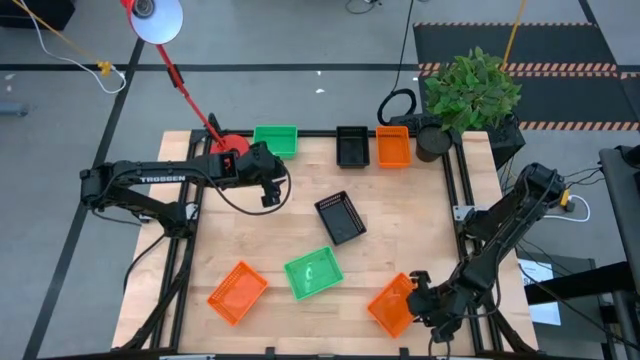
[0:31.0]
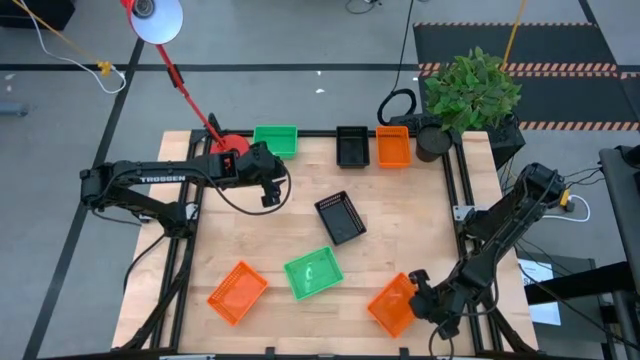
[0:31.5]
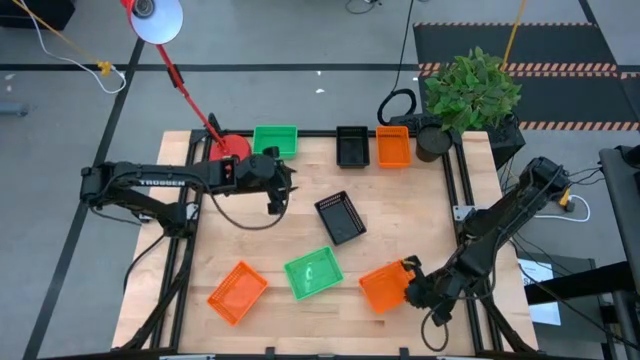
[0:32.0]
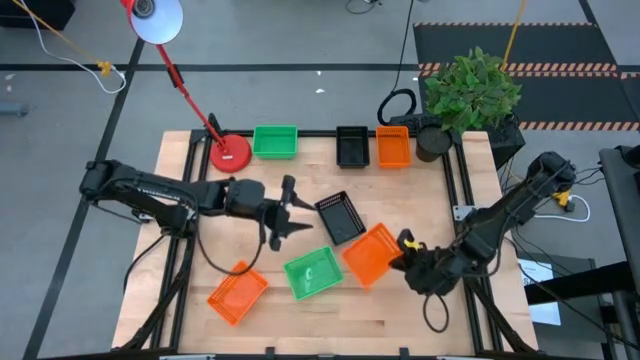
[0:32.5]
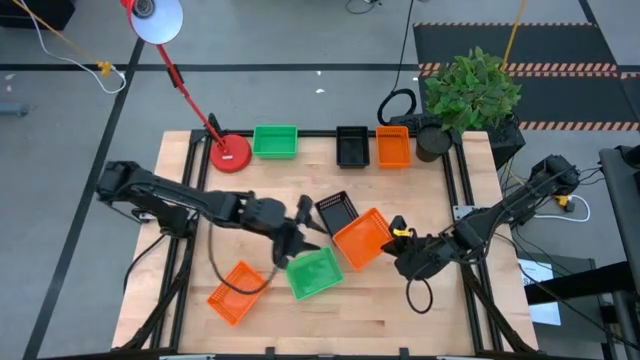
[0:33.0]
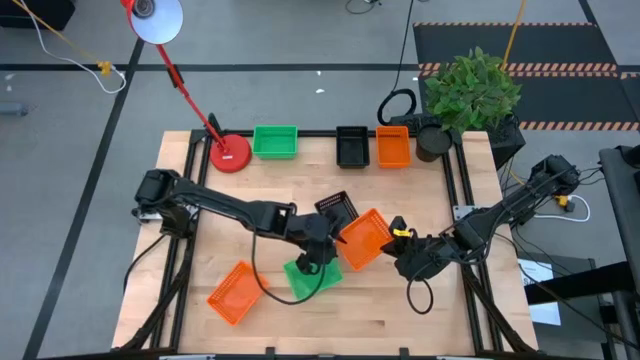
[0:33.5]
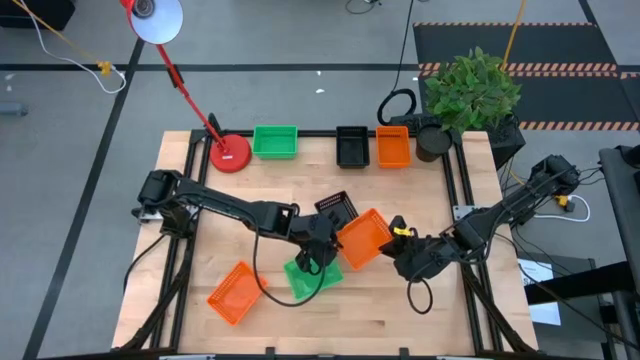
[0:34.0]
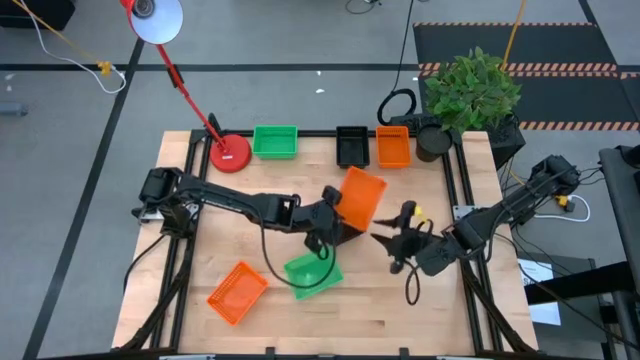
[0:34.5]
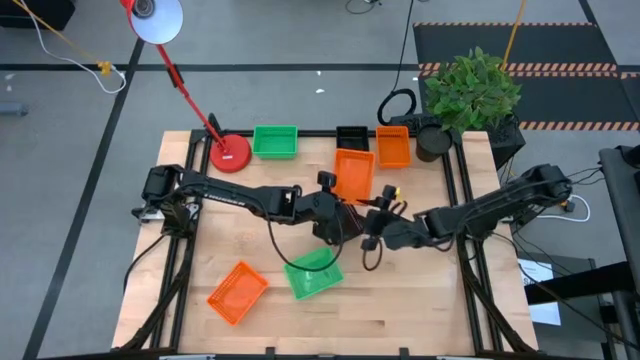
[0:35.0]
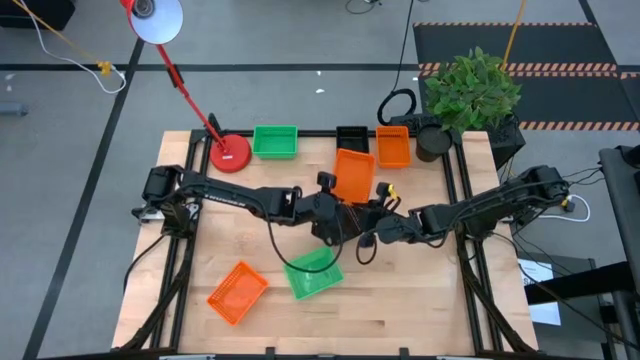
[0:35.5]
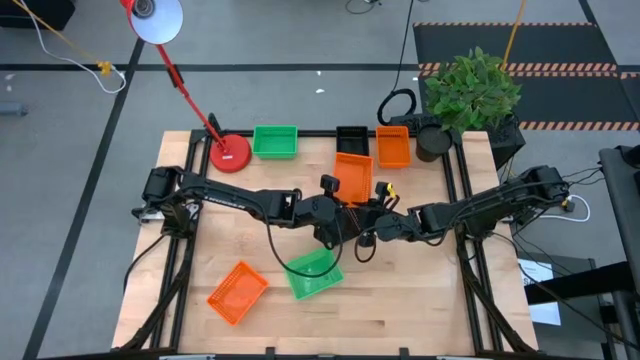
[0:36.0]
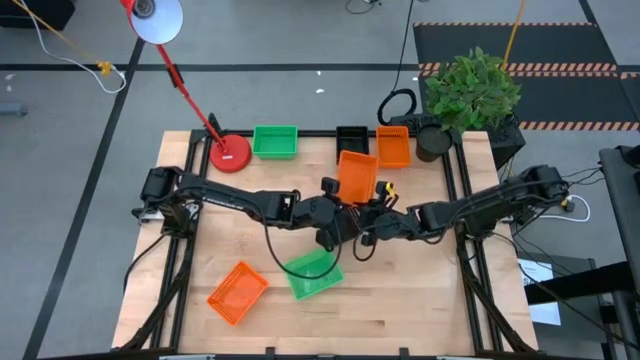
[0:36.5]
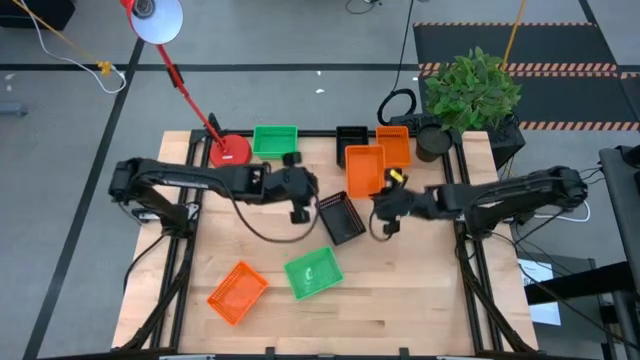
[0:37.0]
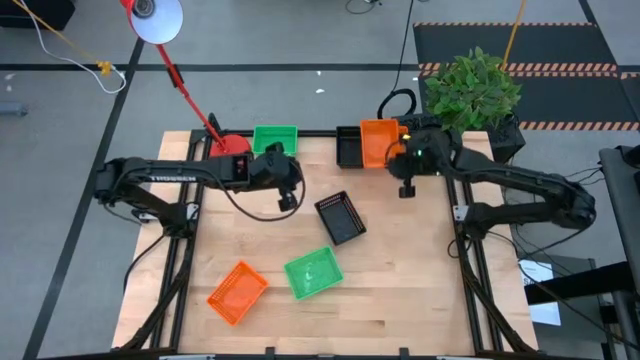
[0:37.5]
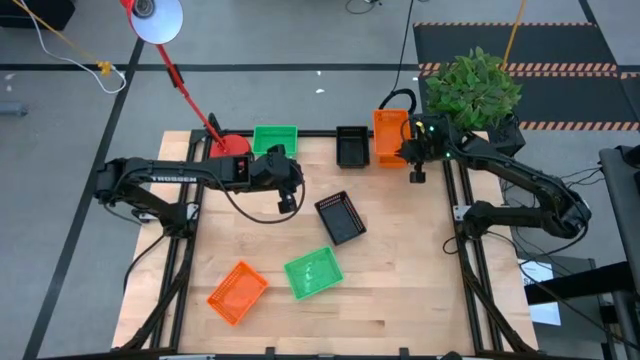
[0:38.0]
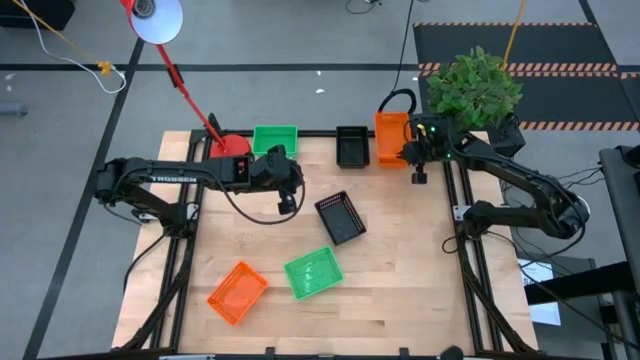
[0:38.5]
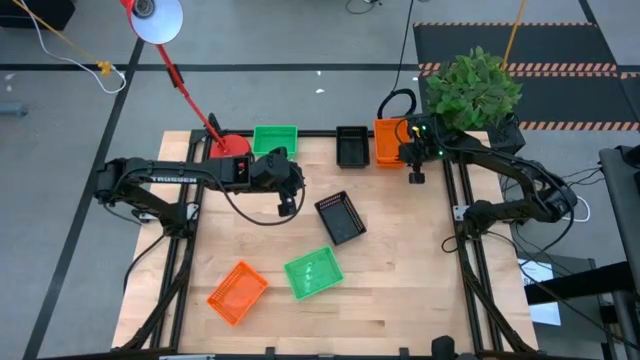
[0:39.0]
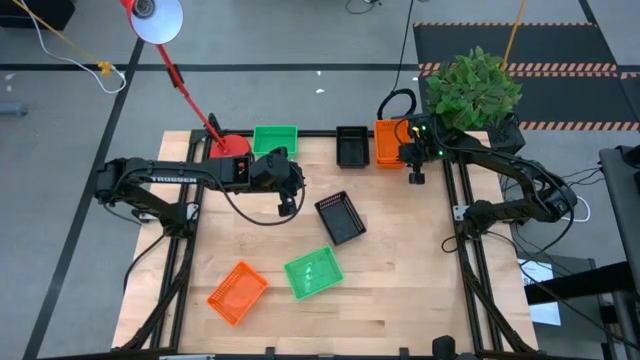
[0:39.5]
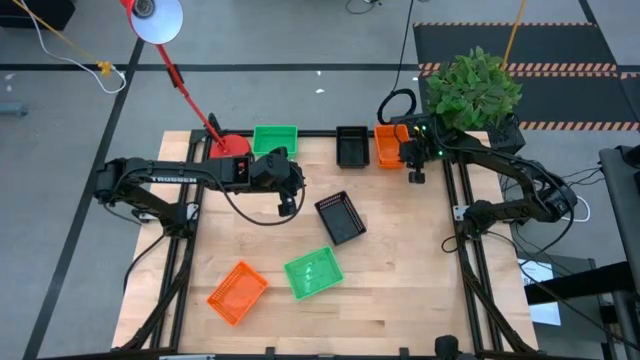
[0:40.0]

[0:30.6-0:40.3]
Stack the bottom right orange bin on the top orange bin

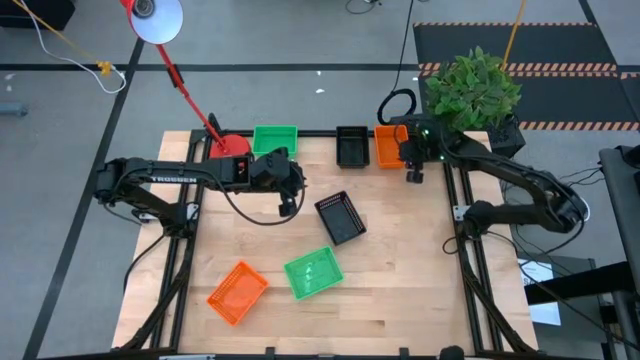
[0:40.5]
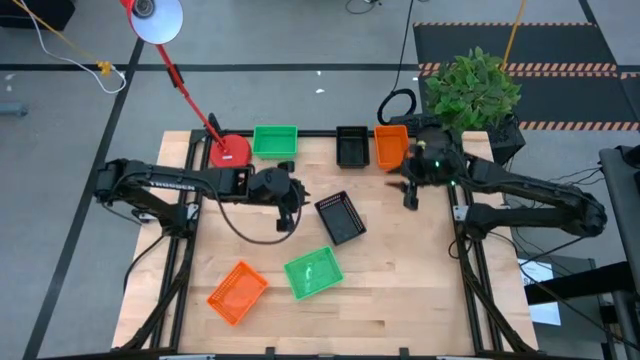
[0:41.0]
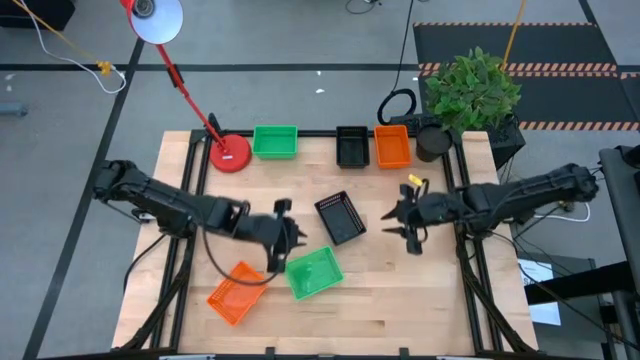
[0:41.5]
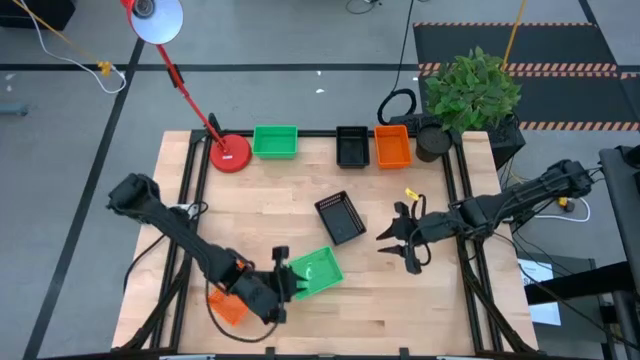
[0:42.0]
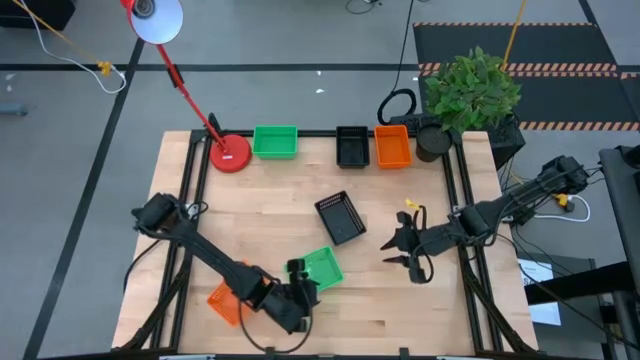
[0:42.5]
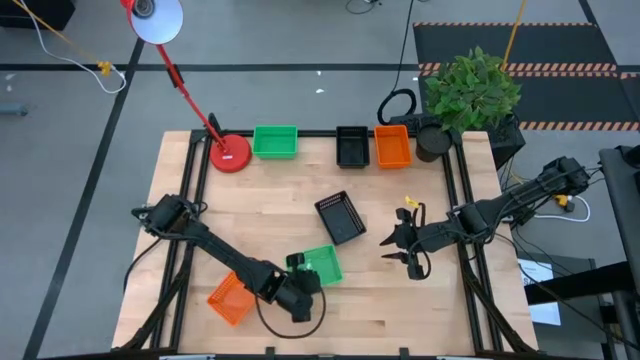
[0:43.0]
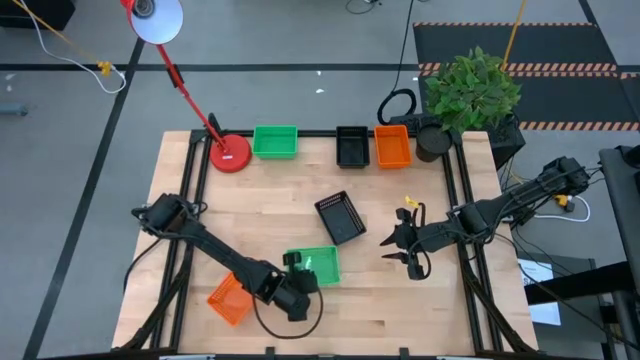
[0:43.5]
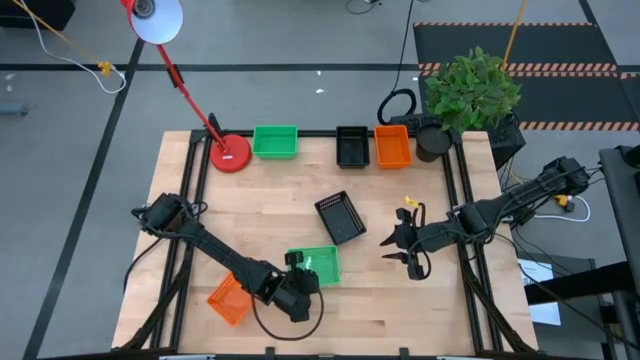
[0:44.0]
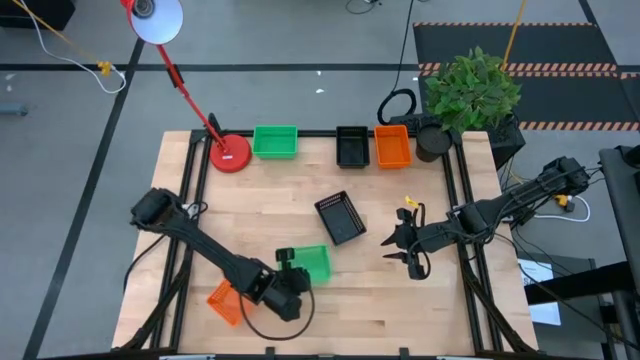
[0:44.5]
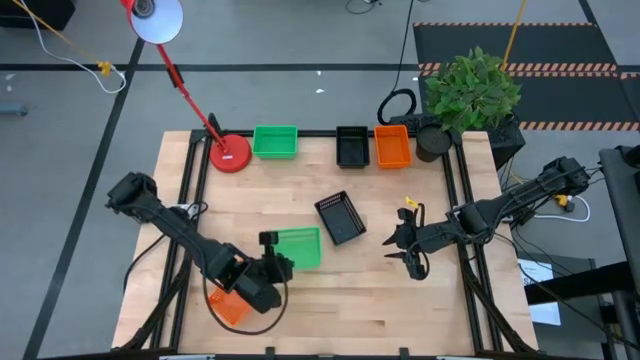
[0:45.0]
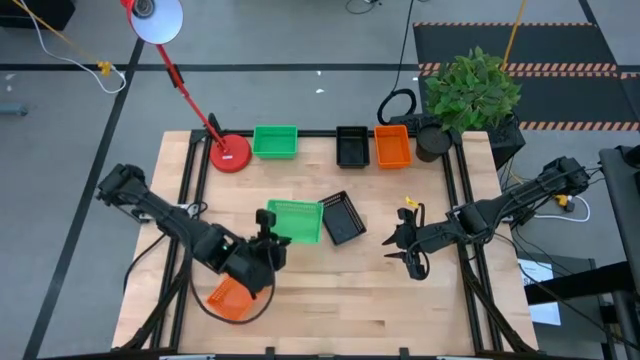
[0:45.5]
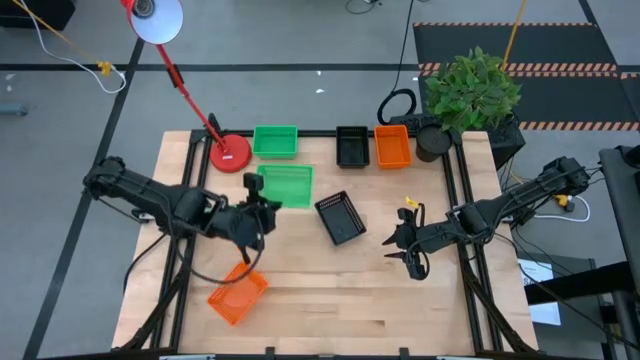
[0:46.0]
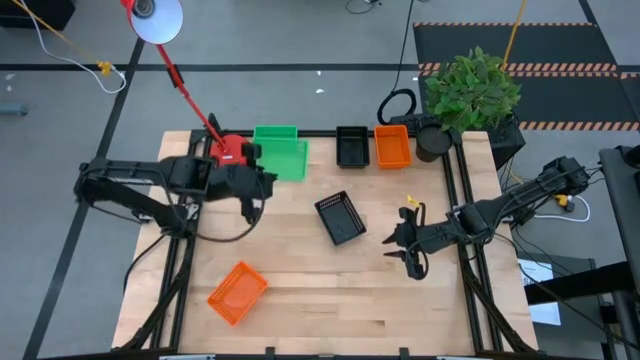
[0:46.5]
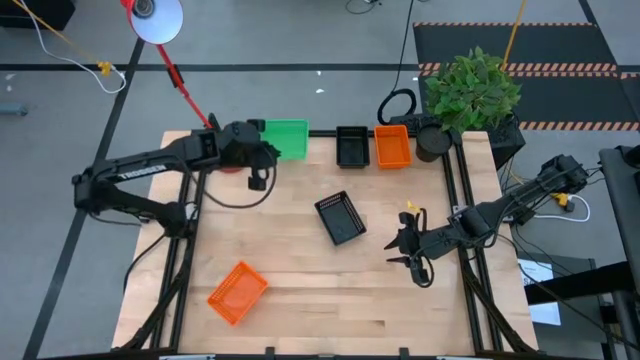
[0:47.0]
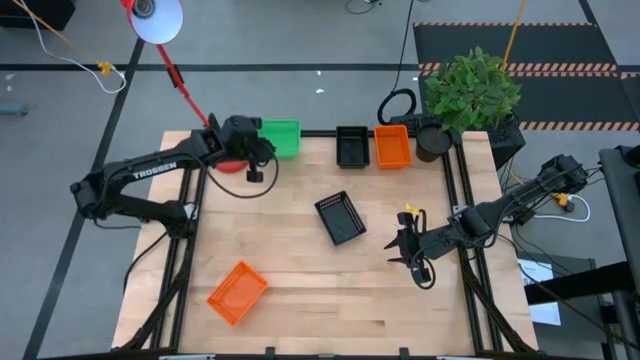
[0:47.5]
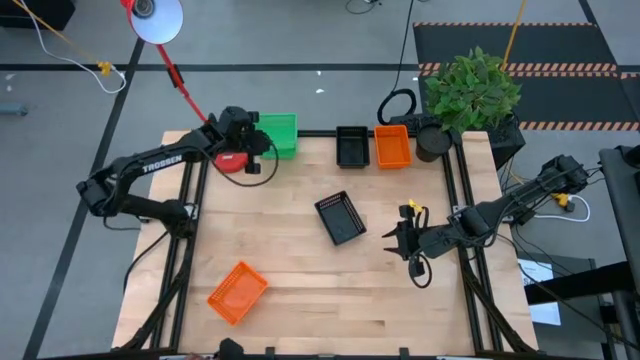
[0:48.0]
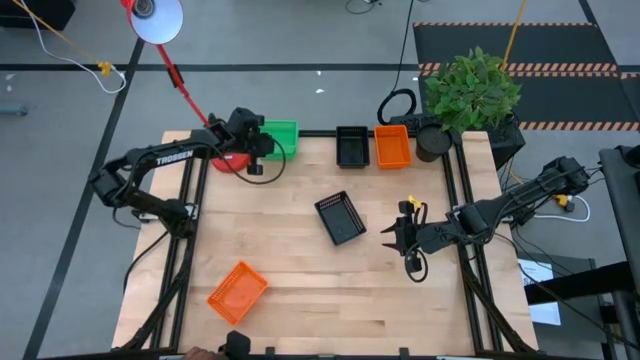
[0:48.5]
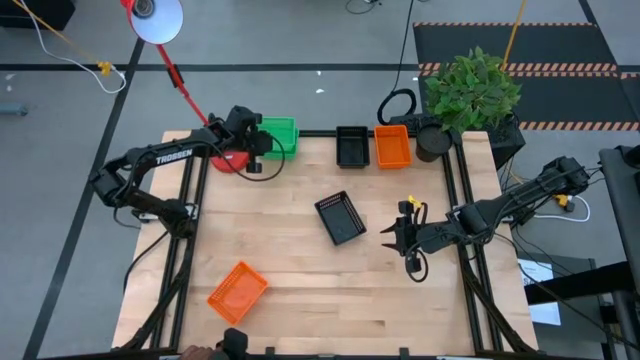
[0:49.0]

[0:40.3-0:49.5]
Stack the bottom green bin on the top green bin
